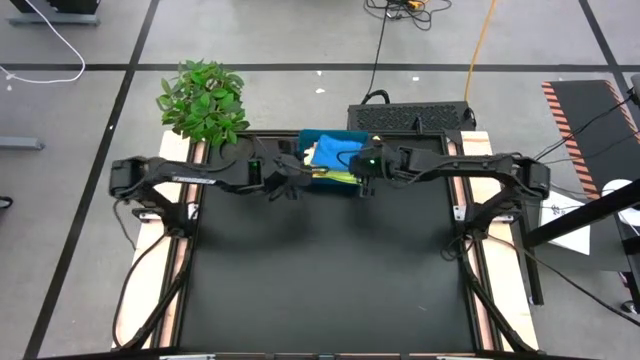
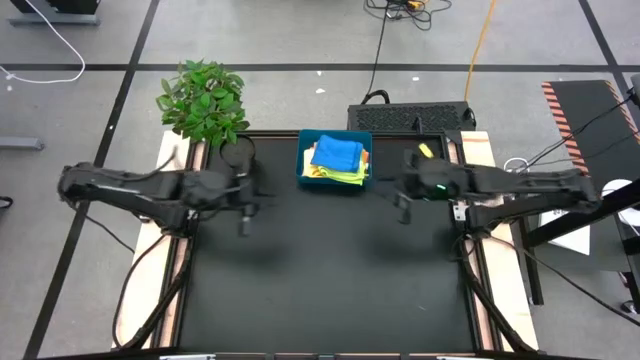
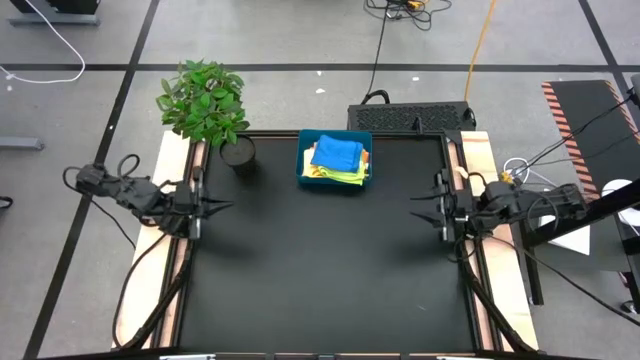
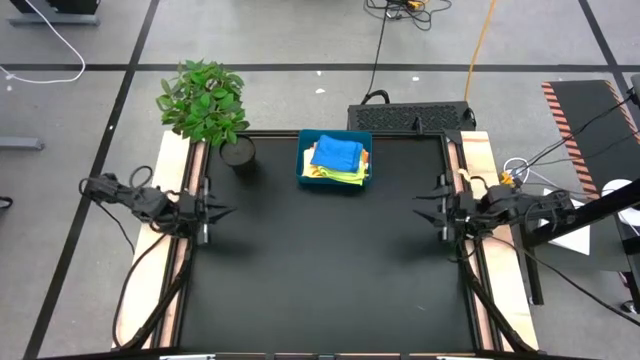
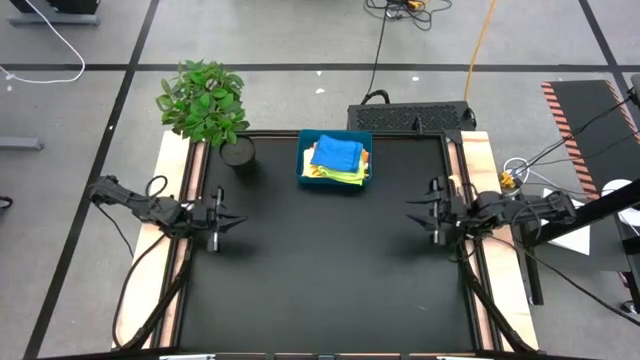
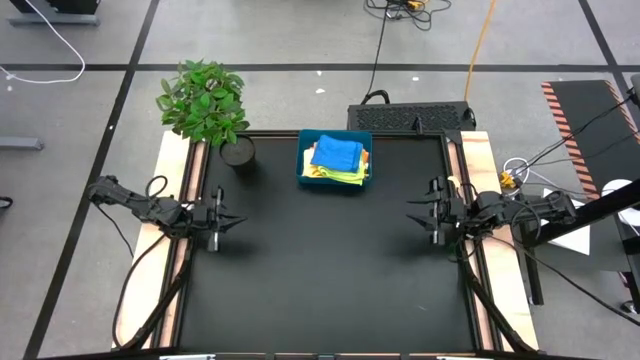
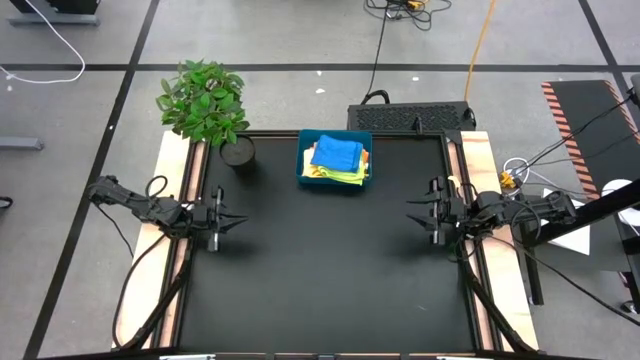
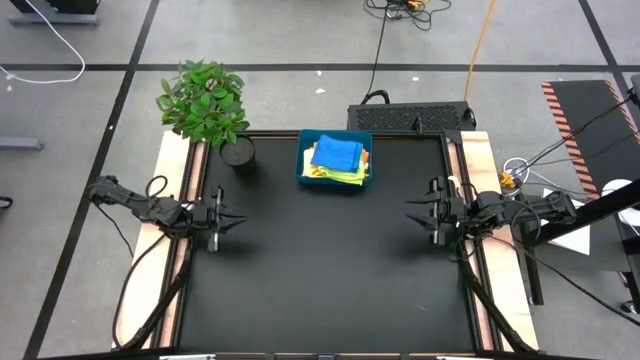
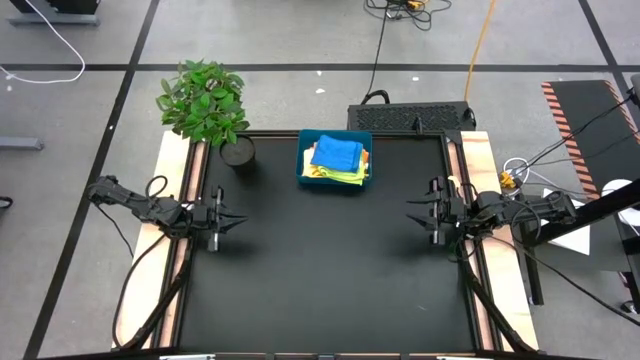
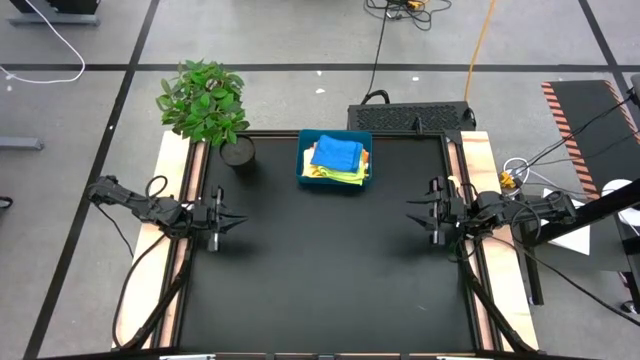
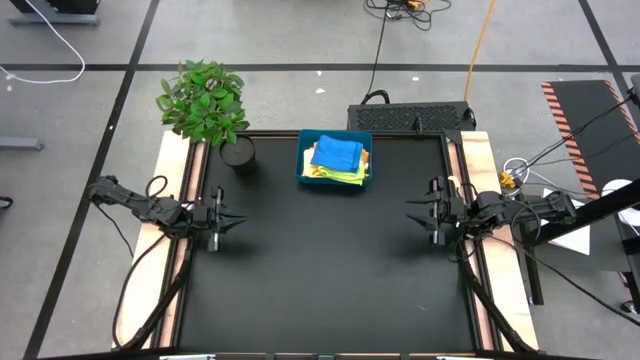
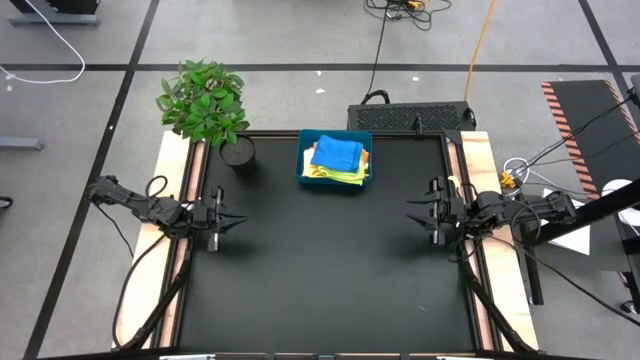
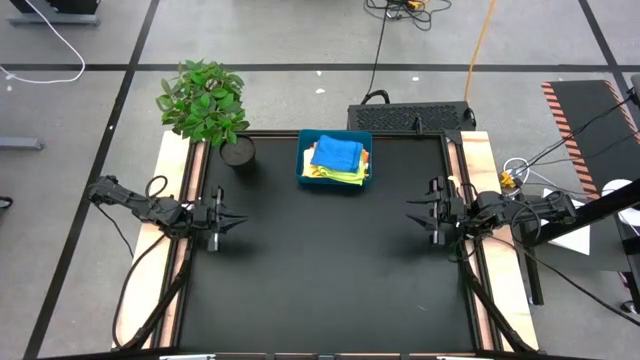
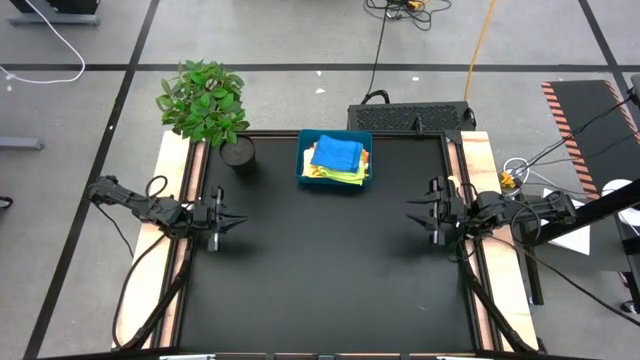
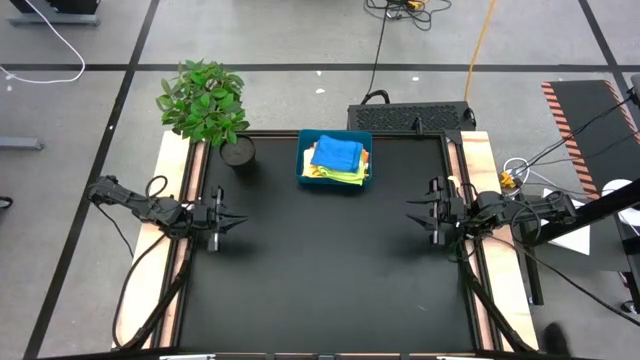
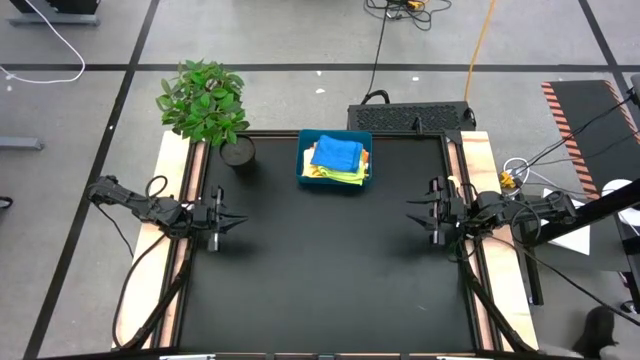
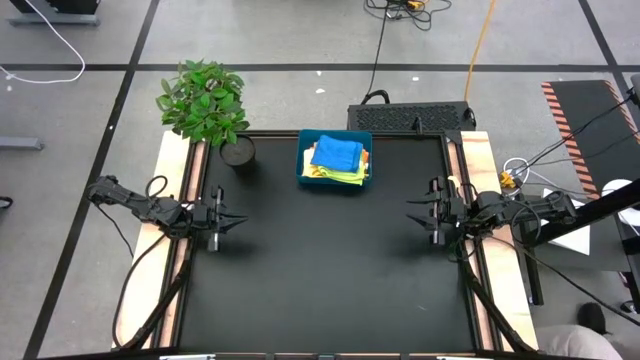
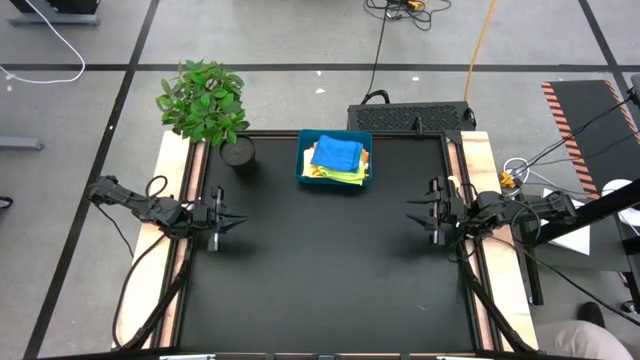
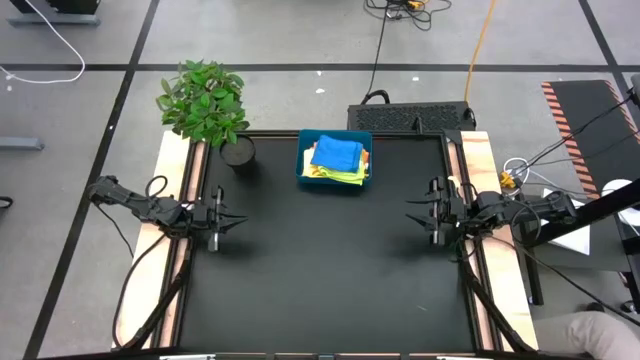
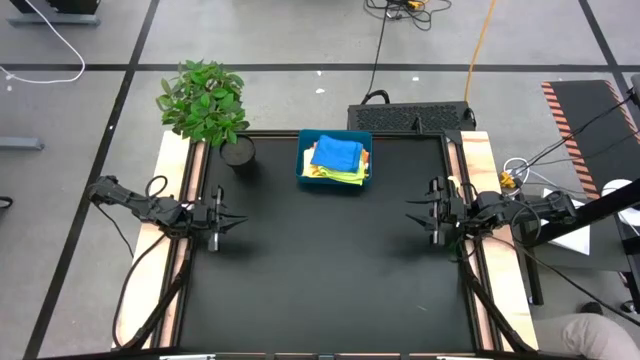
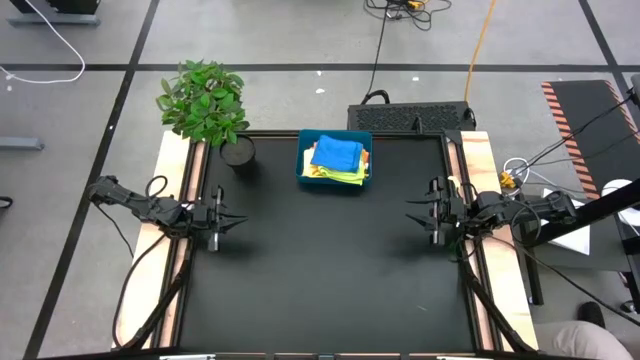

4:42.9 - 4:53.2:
Task: Fold microfiber towels
Return to Home Position

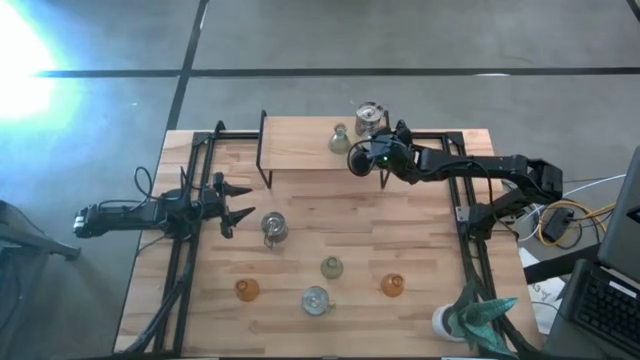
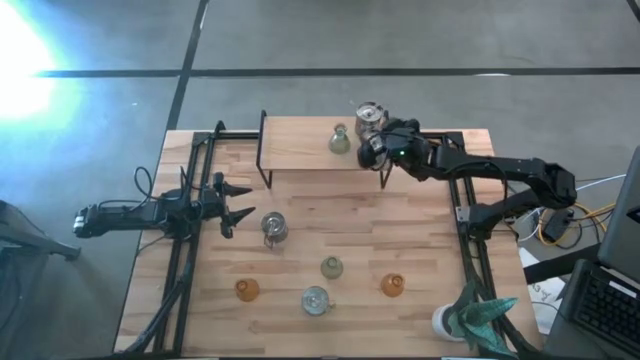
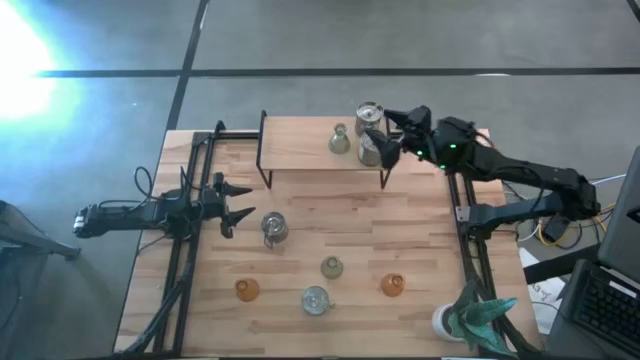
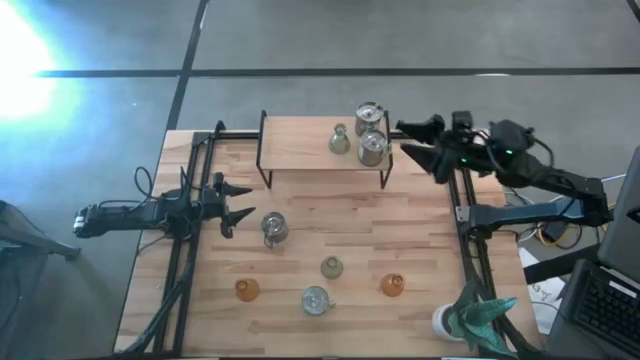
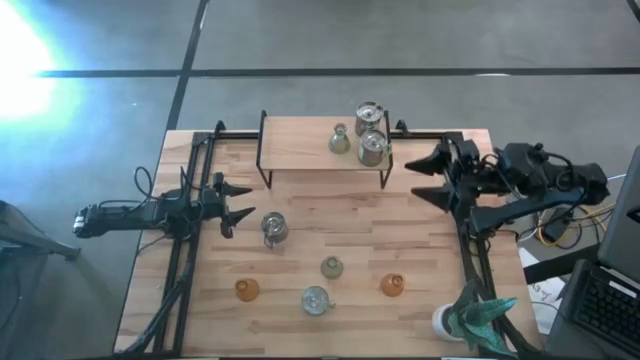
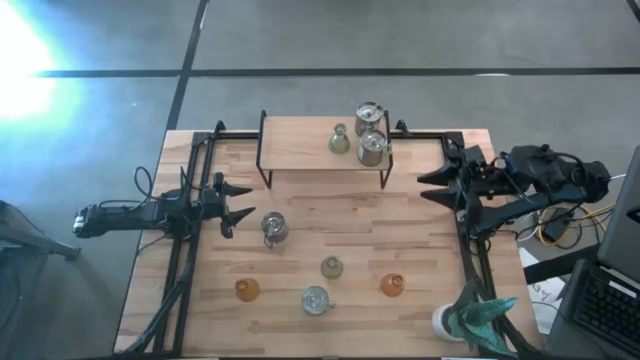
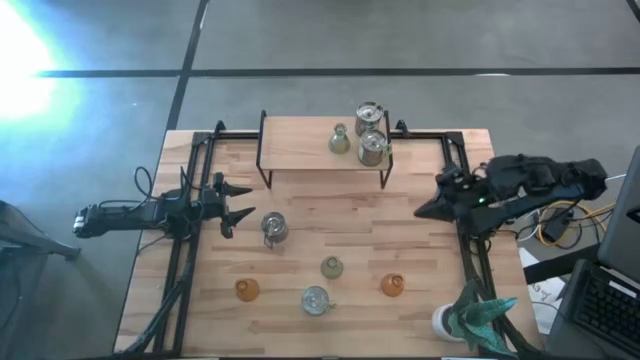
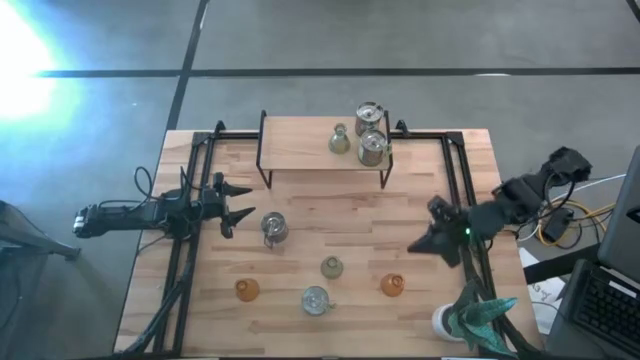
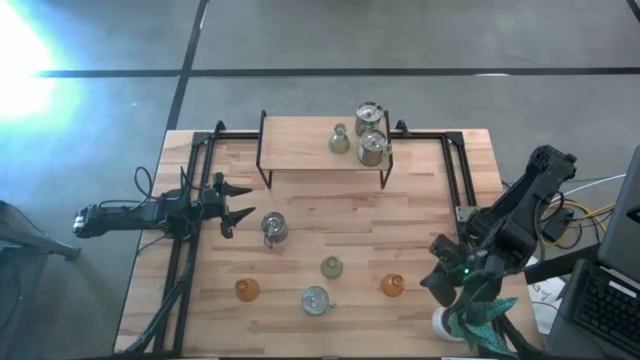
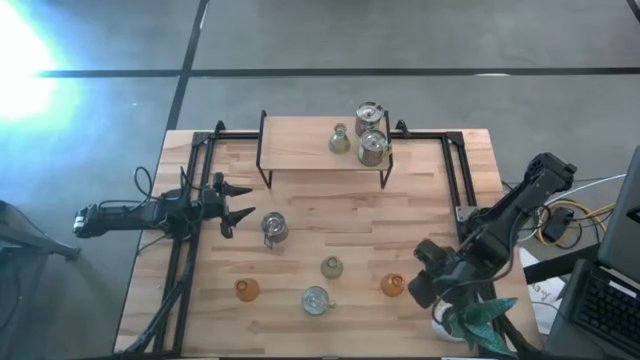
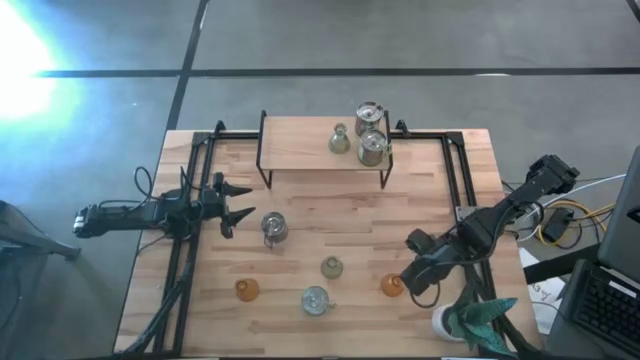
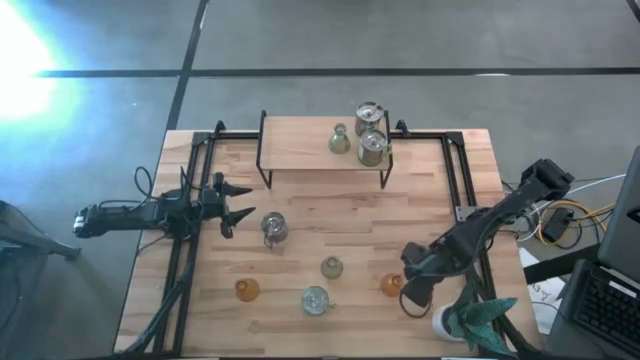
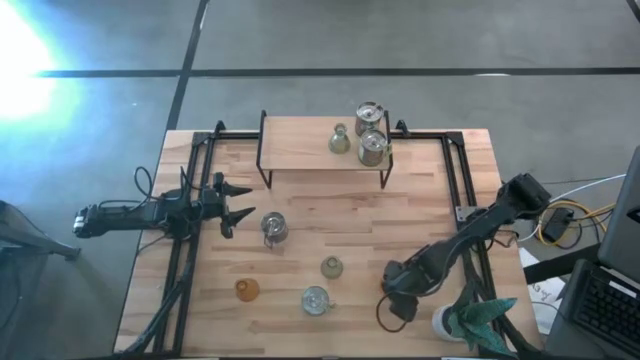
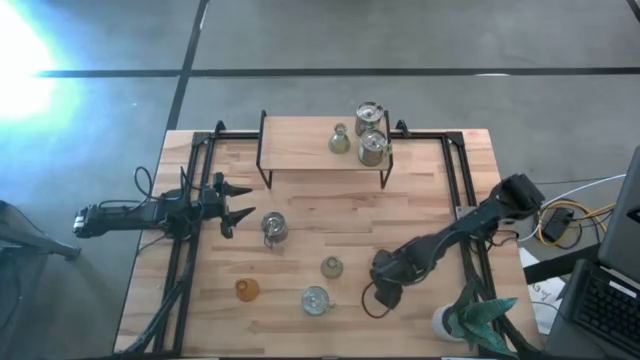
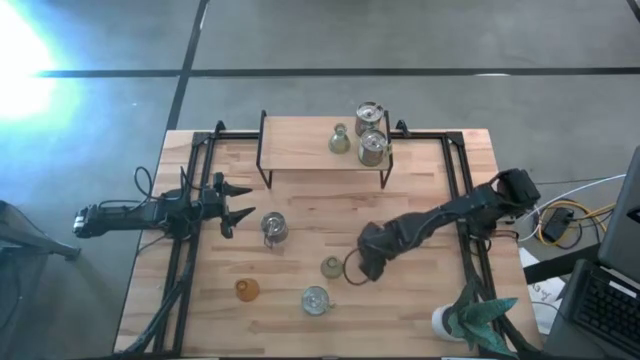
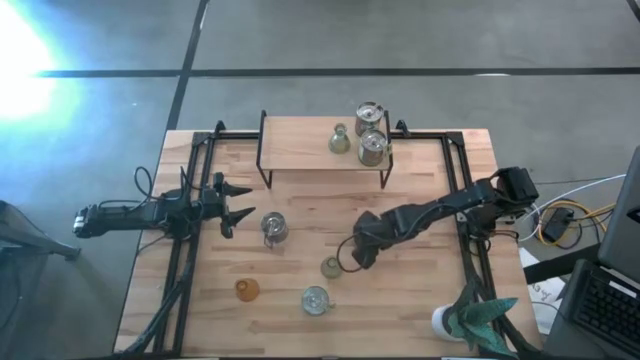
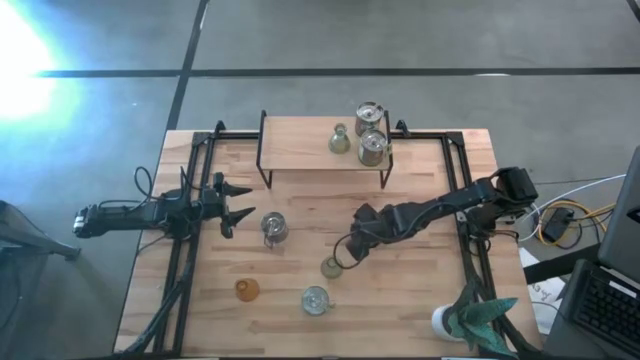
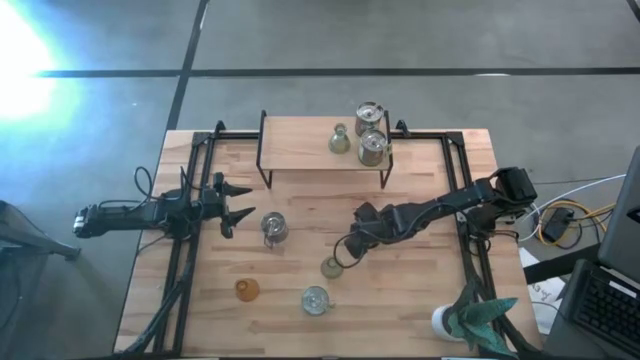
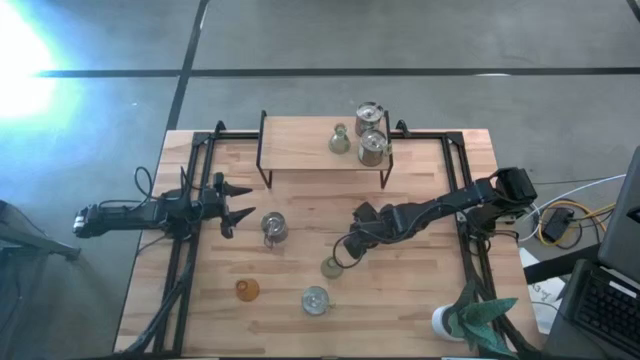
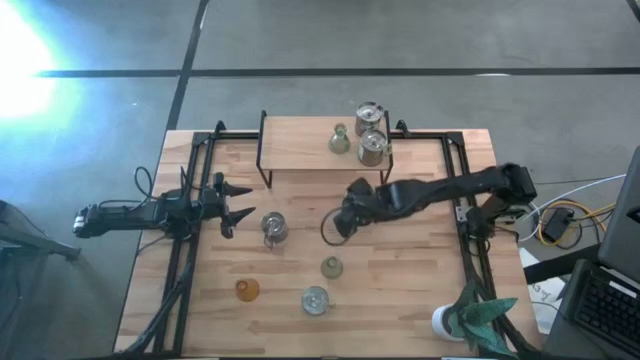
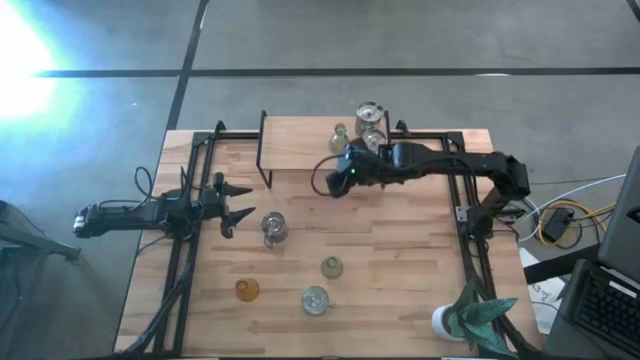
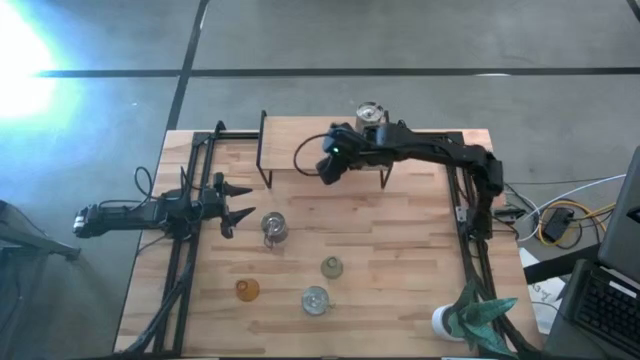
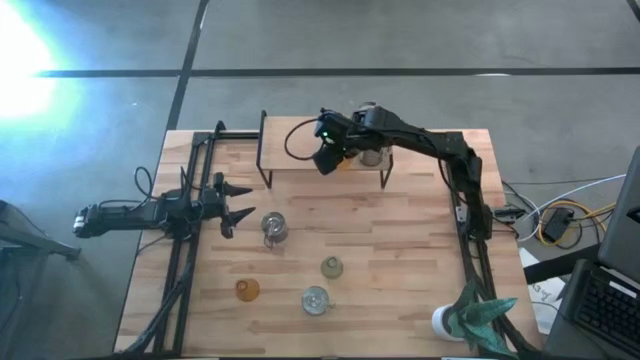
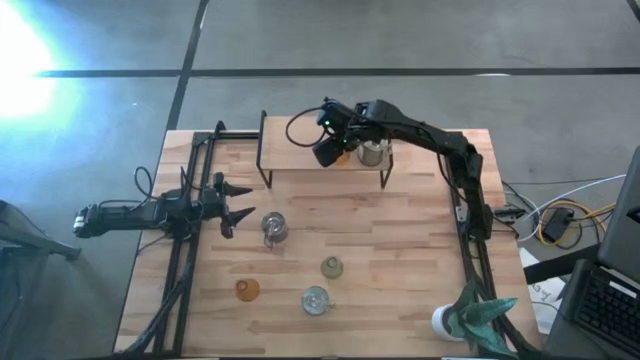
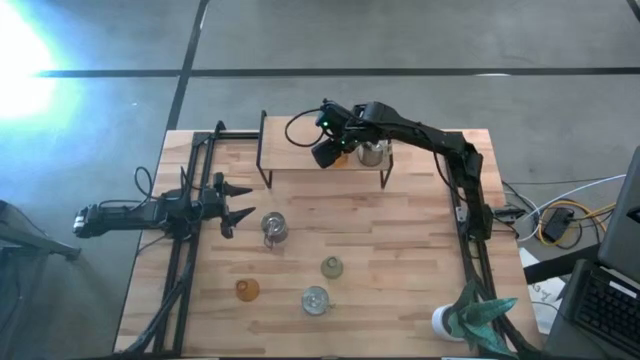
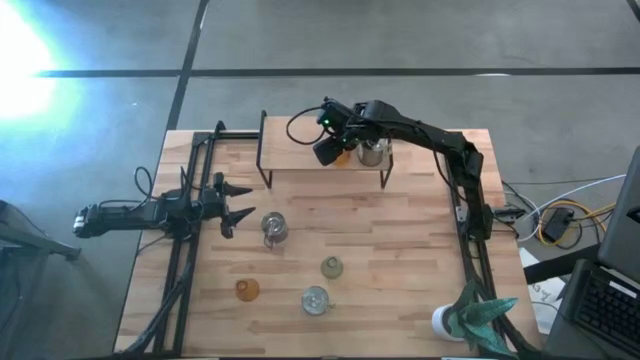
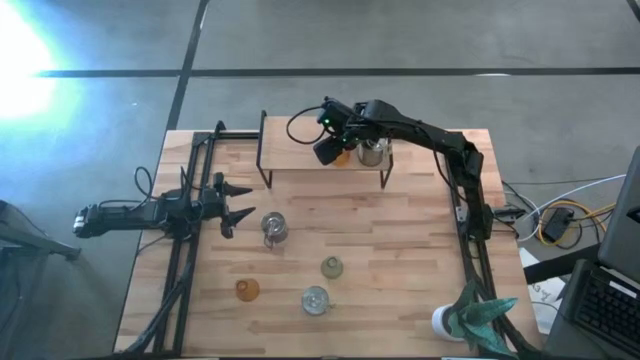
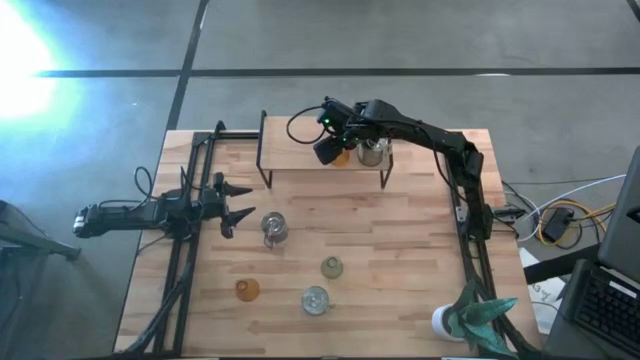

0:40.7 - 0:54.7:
Task: Pick & Place candle stick holders
Put the right orange glass candle holder on the shelf aligned with the green glass candle holder
